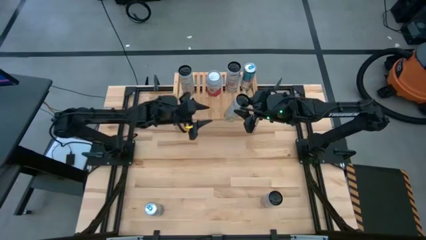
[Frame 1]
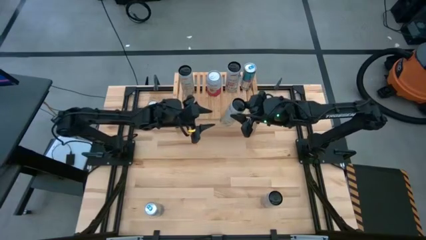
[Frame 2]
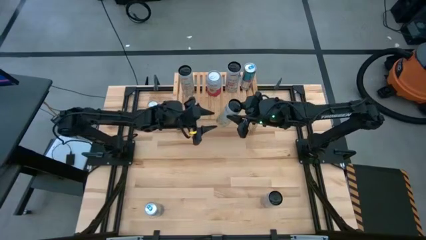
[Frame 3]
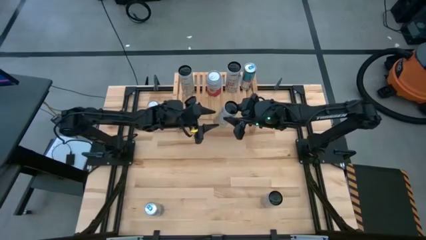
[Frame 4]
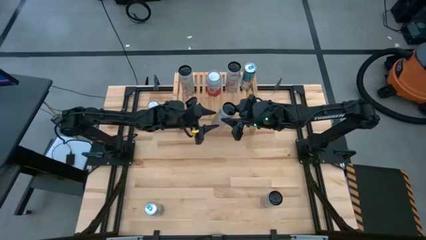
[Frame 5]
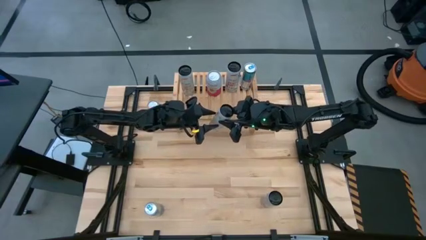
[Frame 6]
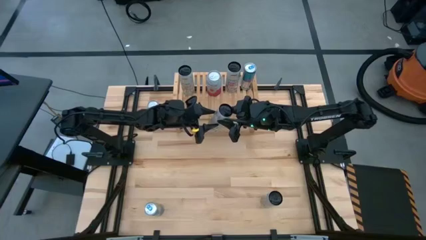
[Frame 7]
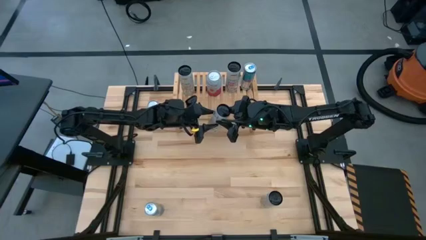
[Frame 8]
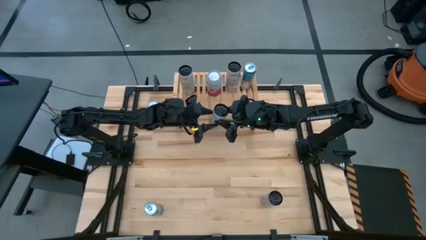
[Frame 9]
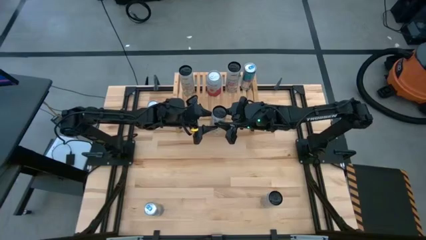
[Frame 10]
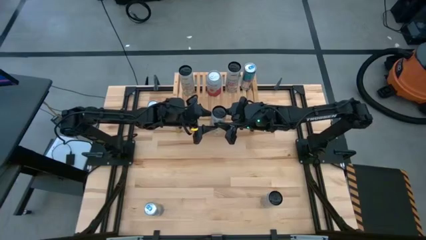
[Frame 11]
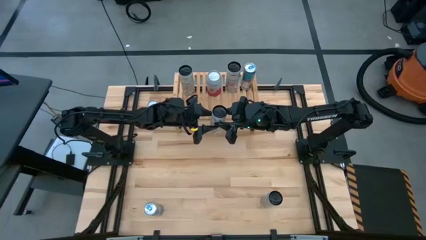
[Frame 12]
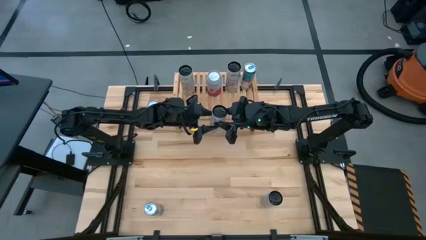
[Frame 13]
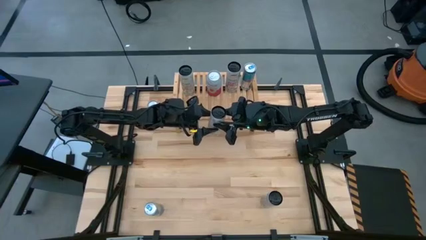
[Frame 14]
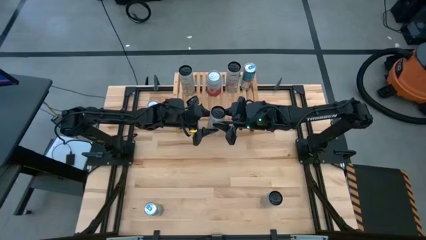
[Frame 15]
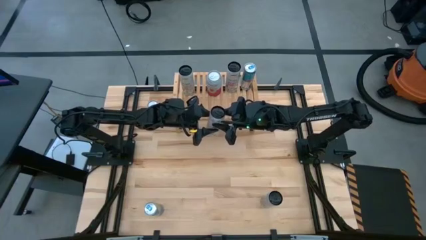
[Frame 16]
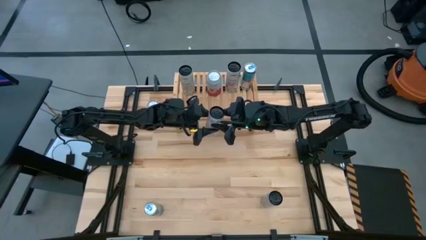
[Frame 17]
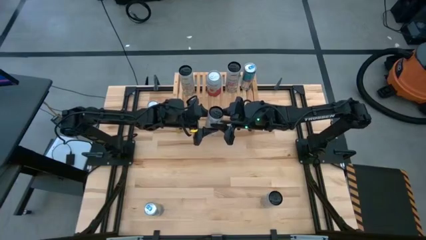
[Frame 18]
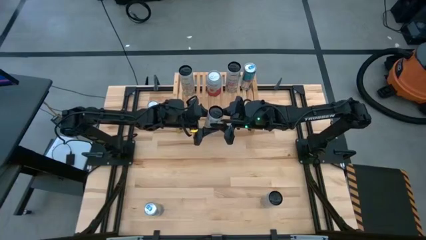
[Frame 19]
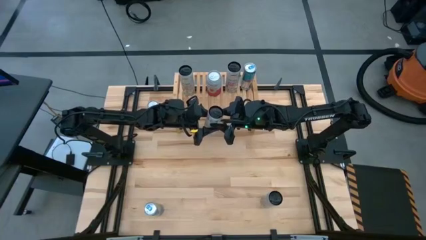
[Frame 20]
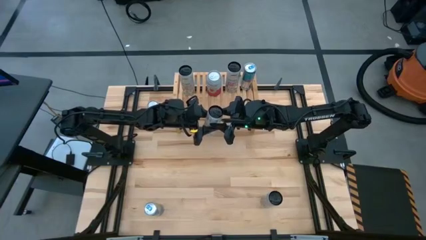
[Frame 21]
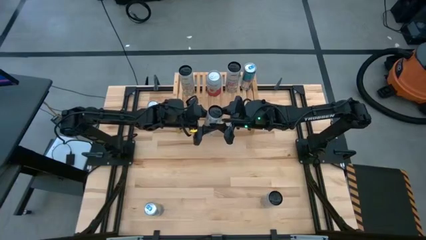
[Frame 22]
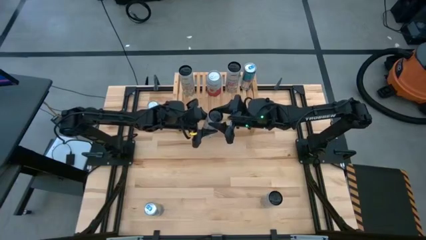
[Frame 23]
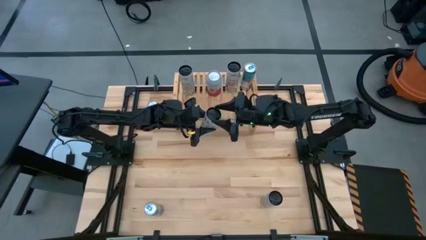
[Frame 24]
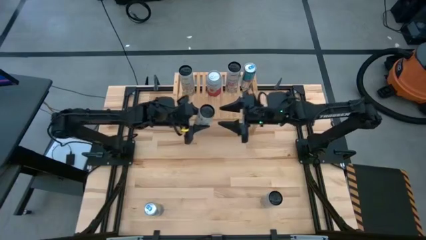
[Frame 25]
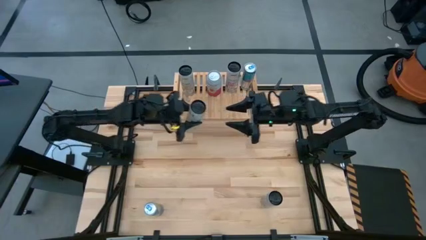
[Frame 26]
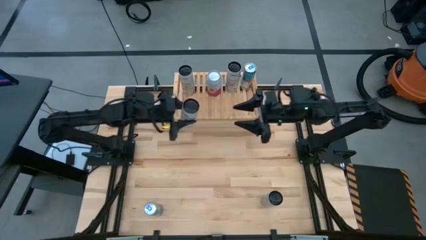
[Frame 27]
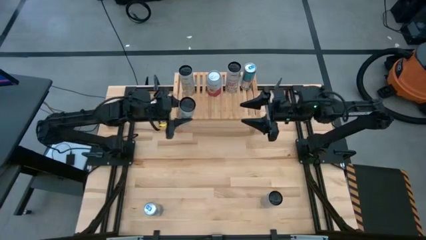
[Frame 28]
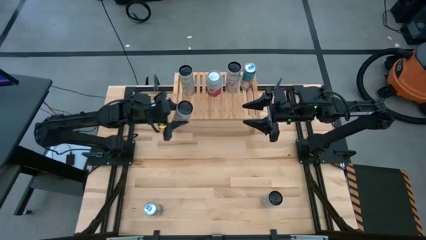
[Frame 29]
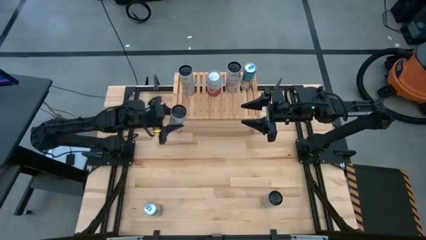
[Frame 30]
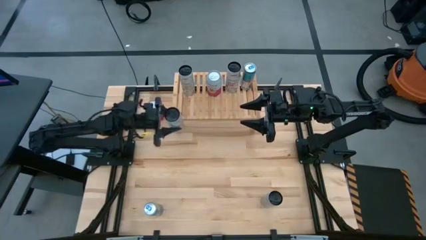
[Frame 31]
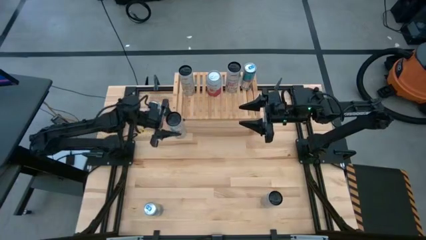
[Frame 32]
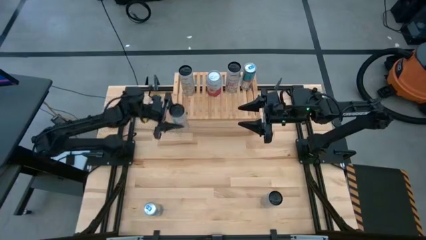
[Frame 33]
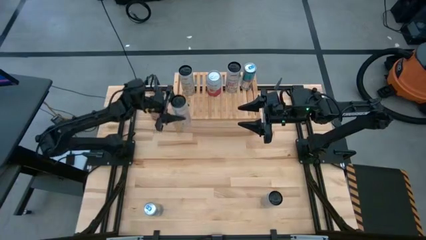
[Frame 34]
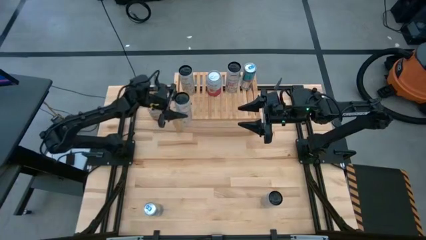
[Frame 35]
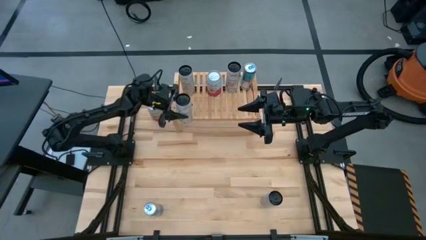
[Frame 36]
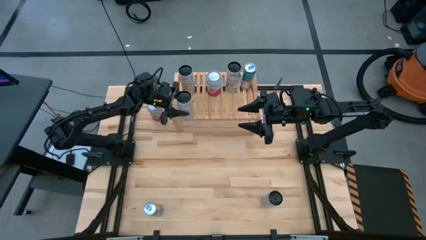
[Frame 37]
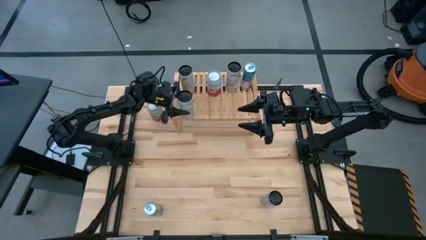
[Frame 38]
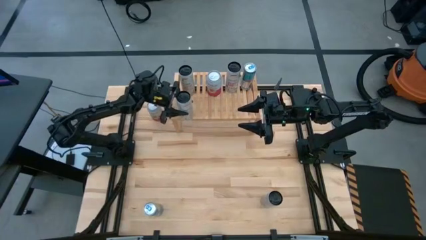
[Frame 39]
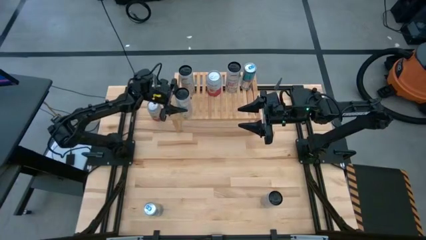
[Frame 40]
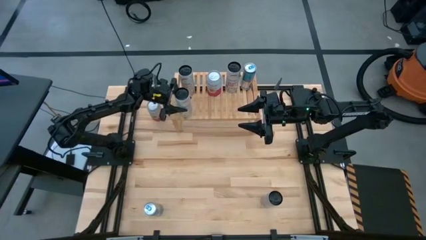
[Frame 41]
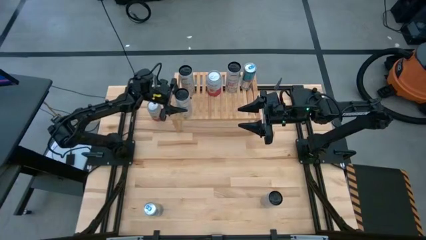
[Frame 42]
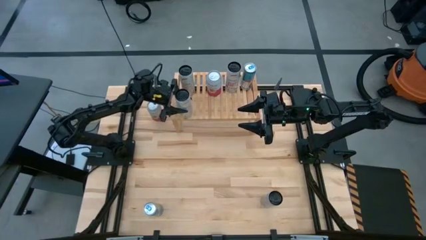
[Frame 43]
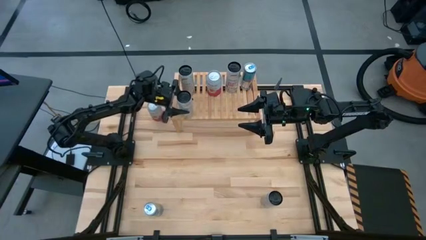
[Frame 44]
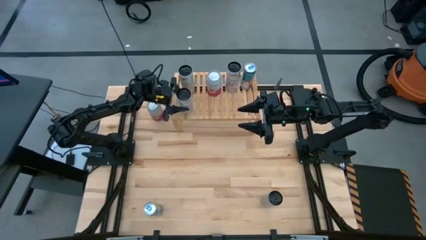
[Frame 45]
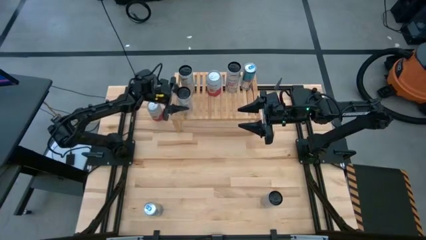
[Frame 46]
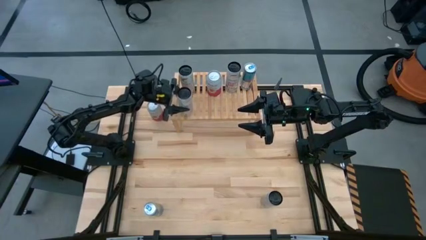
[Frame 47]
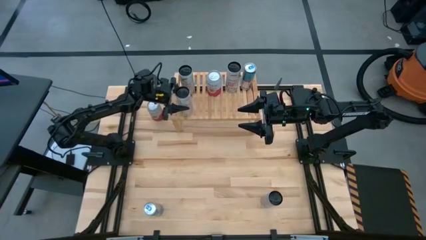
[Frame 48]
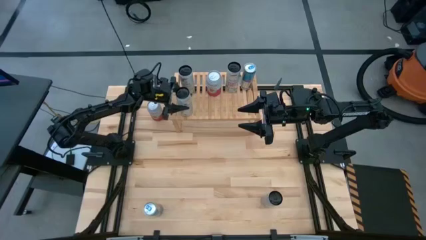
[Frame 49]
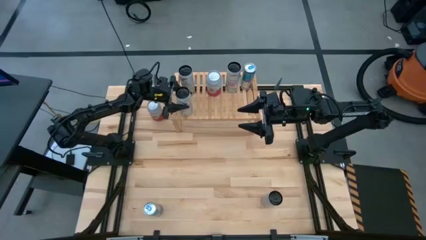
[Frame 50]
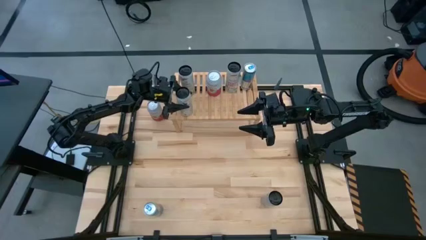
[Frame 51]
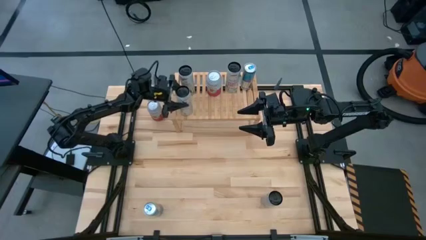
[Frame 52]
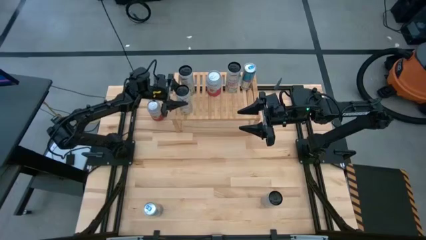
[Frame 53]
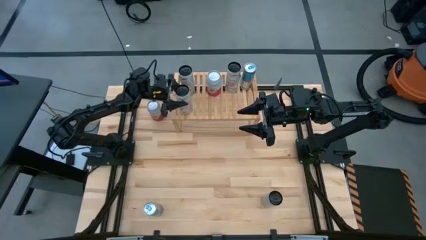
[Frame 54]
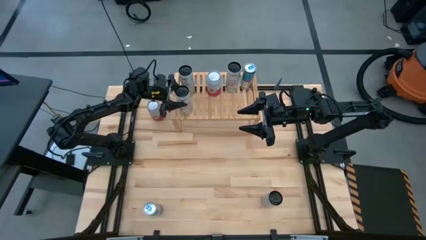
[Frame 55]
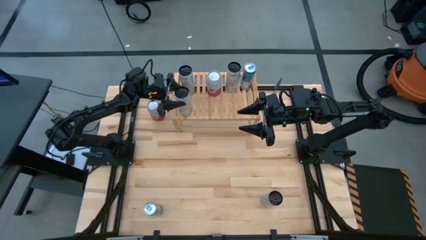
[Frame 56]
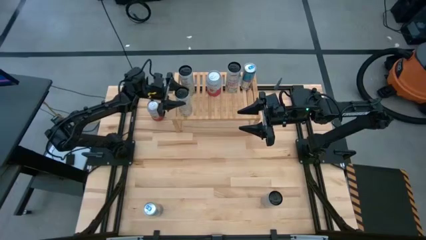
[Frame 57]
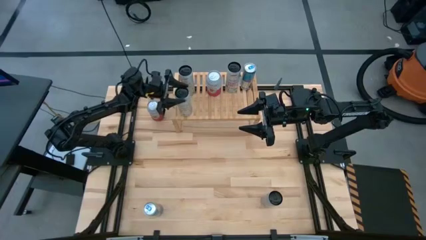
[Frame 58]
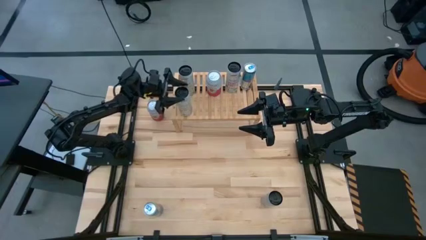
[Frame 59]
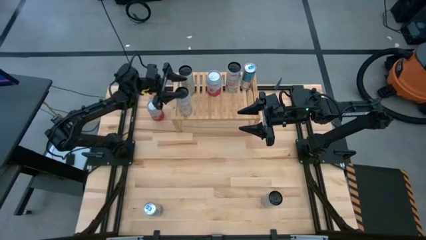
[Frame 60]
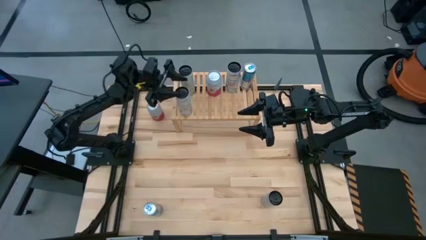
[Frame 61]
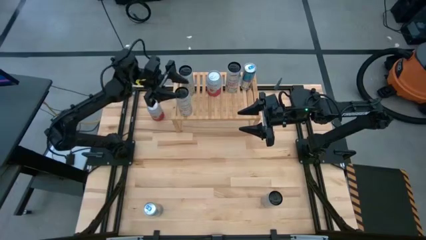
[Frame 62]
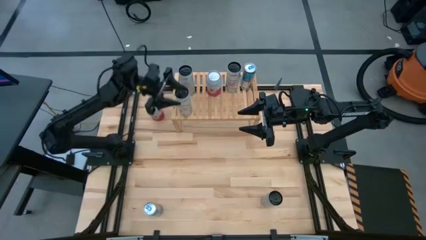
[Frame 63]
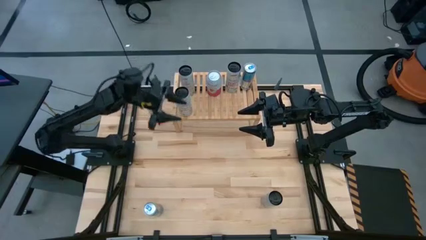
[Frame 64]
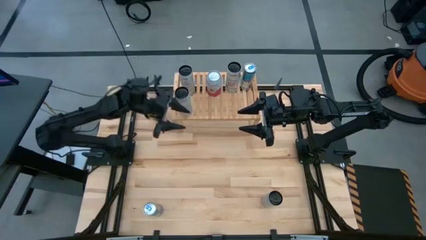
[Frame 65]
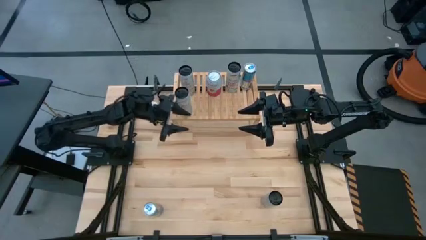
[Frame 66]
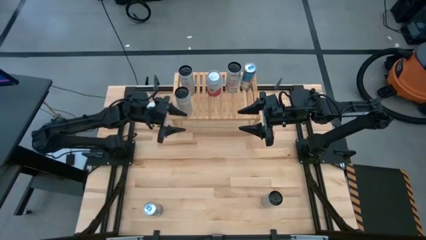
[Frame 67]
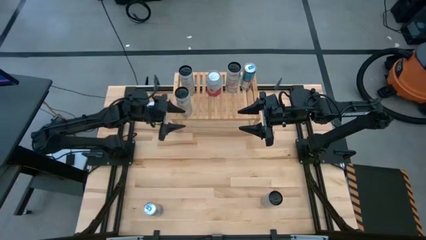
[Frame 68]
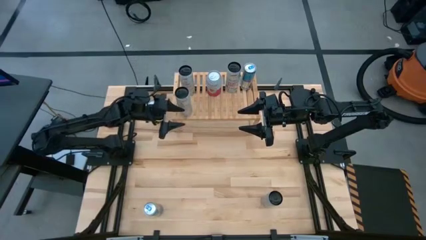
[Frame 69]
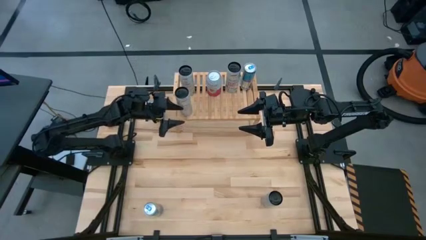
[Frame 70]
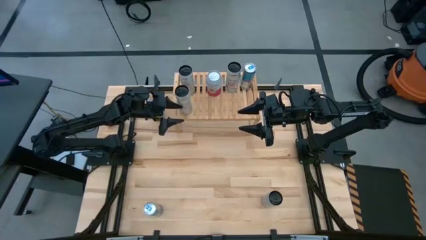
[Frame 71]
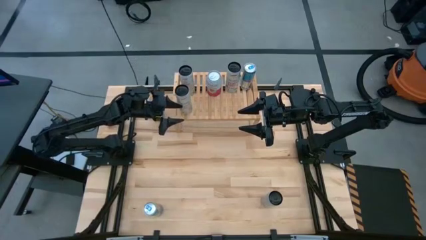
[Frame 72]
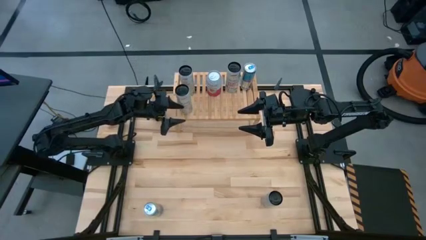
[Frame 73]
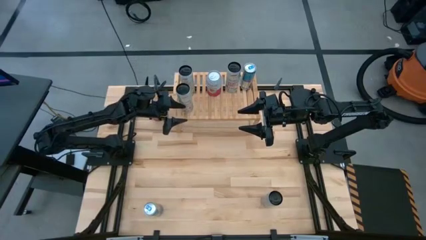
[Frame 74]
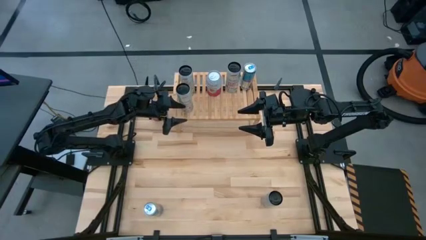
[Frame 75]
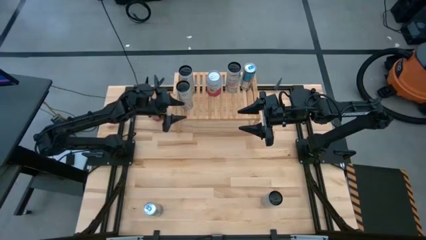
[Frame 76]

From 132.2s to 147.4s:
Task: Place canned beverage on shelf
Put the white yellow soda can on the shelf aligned with the other white yellow soda can
